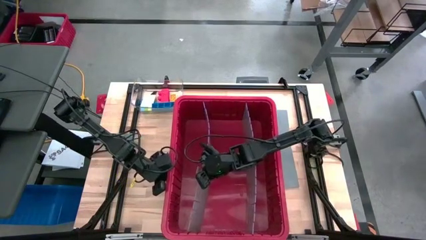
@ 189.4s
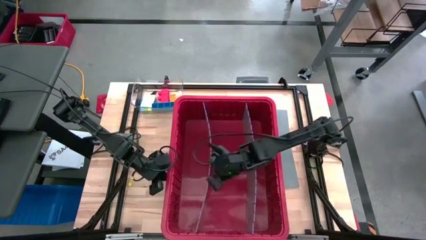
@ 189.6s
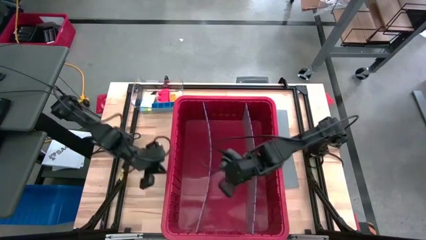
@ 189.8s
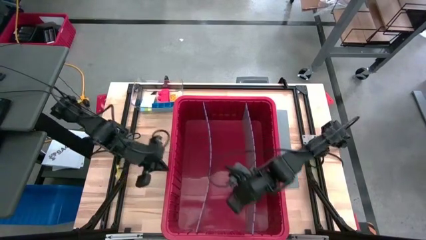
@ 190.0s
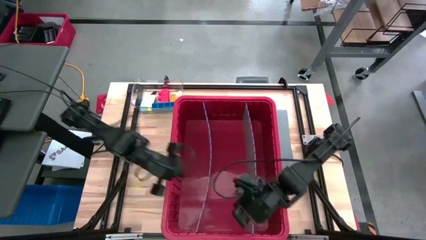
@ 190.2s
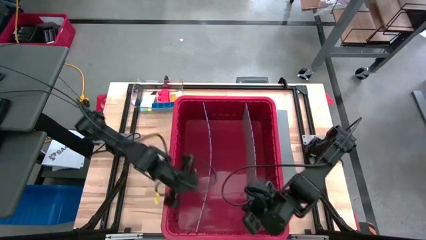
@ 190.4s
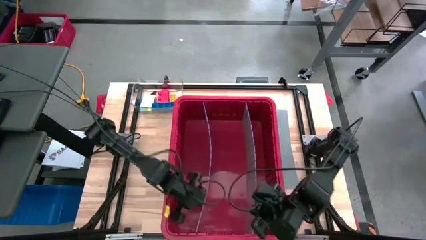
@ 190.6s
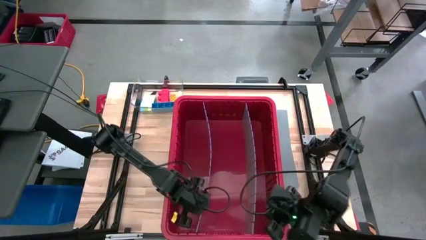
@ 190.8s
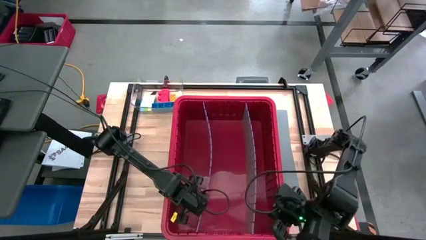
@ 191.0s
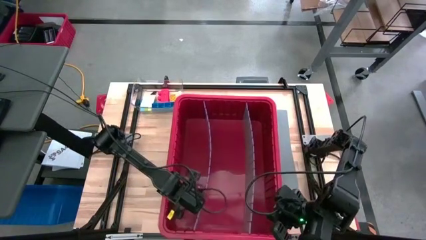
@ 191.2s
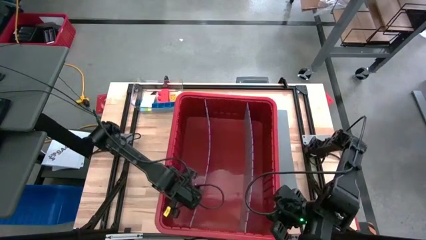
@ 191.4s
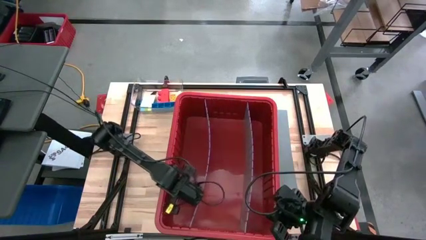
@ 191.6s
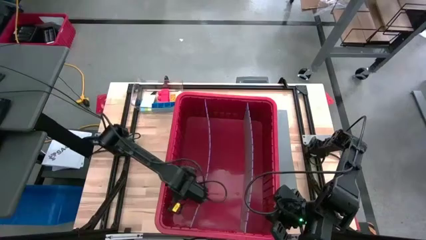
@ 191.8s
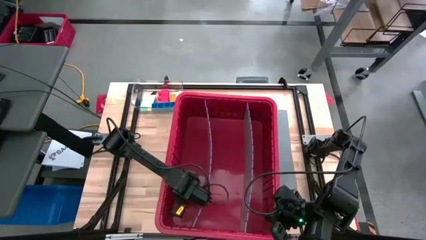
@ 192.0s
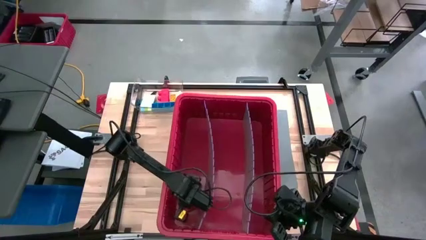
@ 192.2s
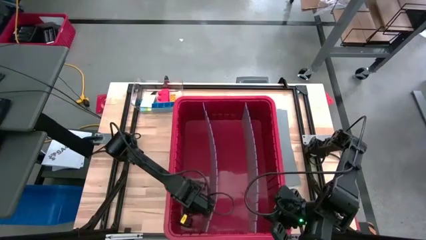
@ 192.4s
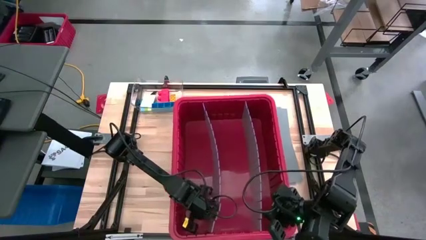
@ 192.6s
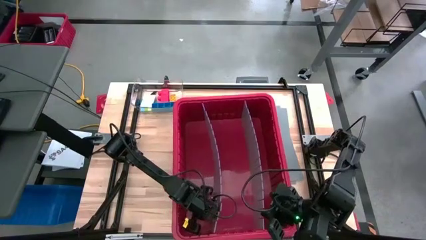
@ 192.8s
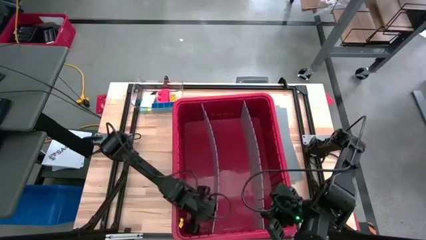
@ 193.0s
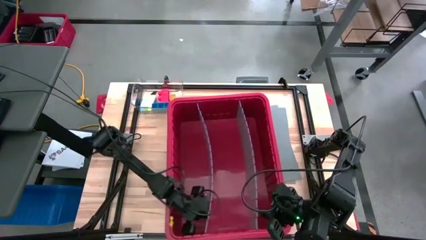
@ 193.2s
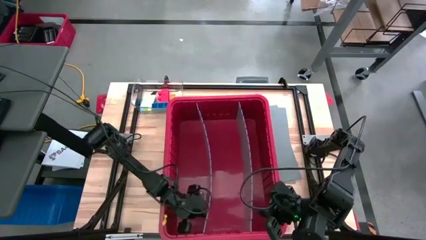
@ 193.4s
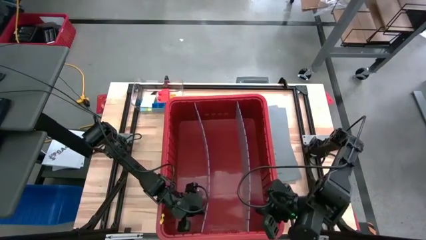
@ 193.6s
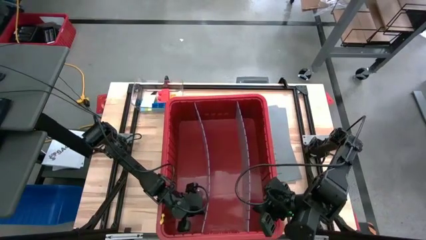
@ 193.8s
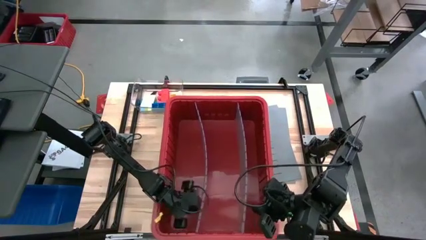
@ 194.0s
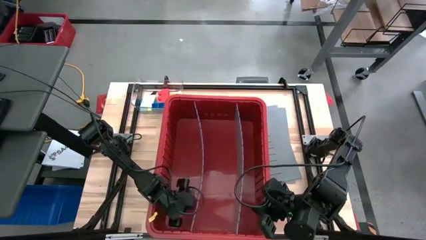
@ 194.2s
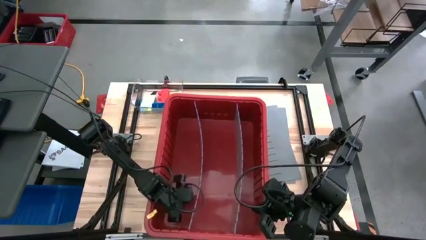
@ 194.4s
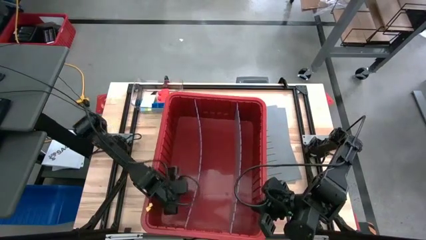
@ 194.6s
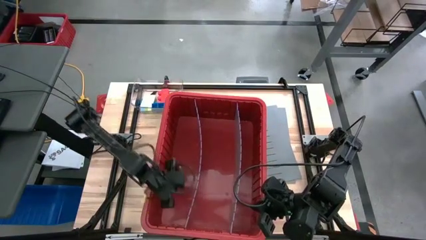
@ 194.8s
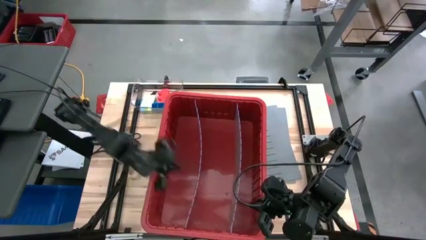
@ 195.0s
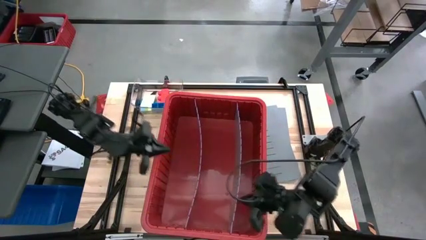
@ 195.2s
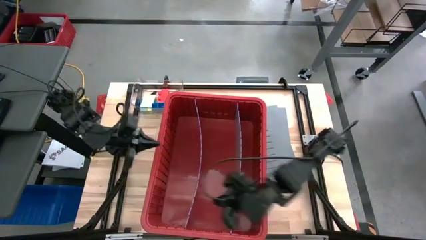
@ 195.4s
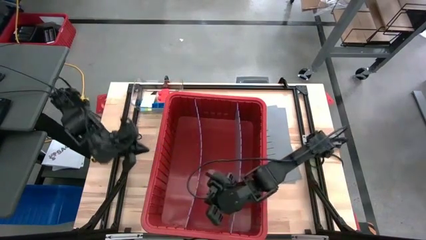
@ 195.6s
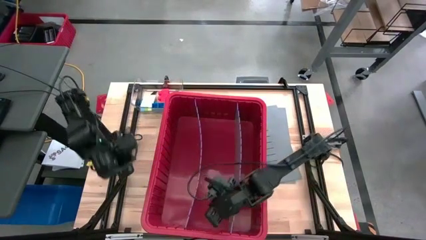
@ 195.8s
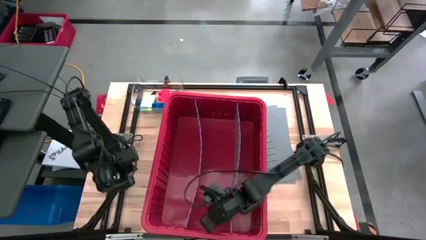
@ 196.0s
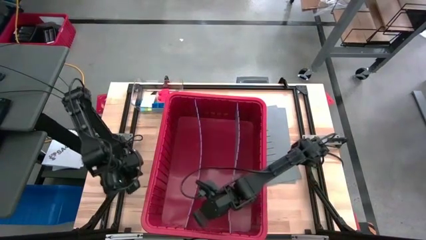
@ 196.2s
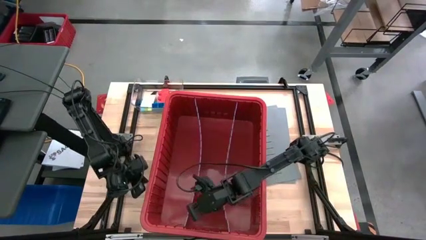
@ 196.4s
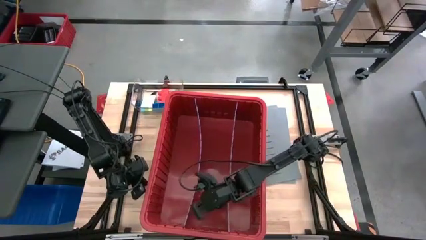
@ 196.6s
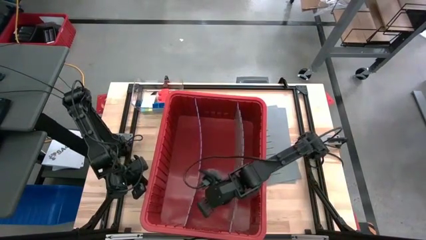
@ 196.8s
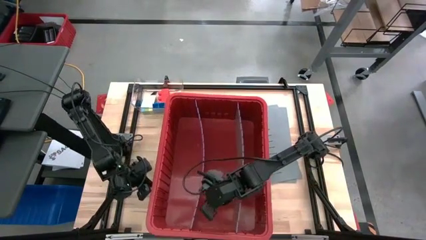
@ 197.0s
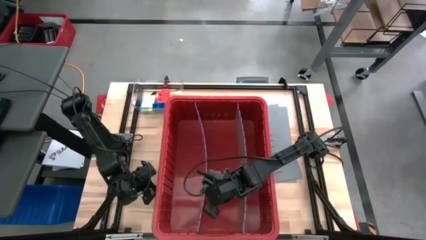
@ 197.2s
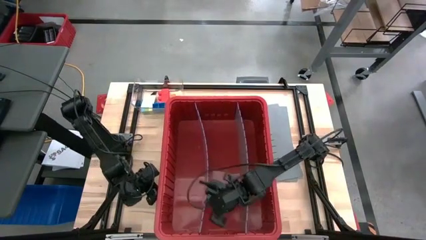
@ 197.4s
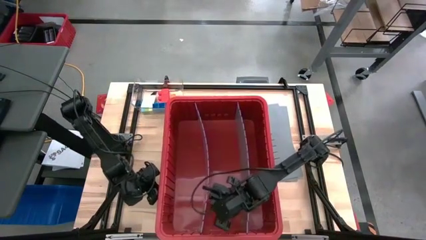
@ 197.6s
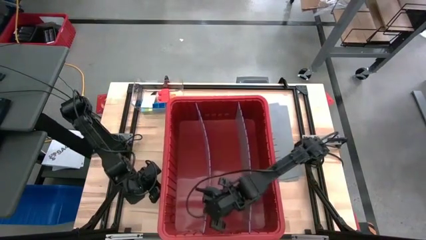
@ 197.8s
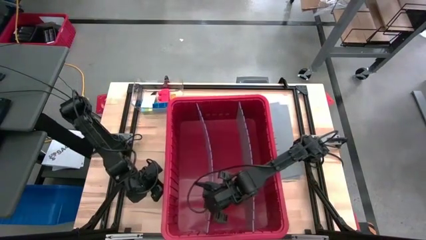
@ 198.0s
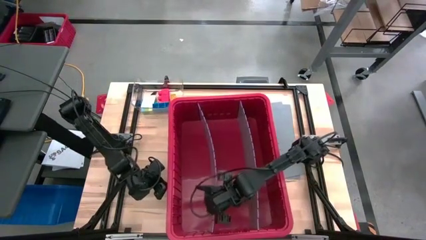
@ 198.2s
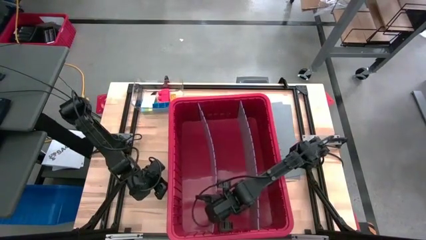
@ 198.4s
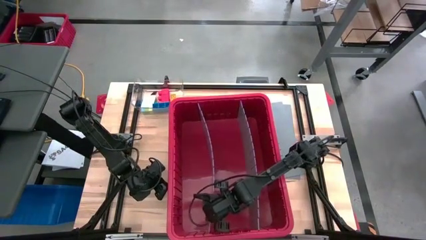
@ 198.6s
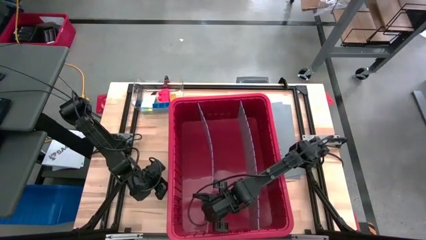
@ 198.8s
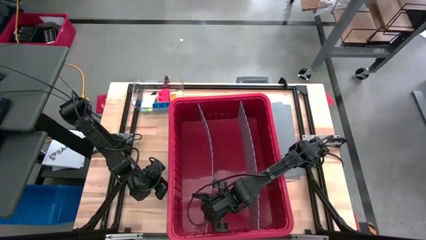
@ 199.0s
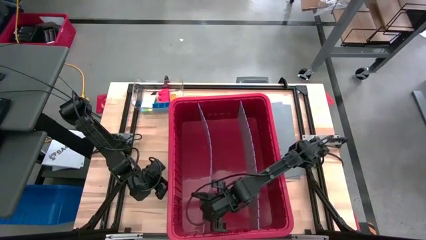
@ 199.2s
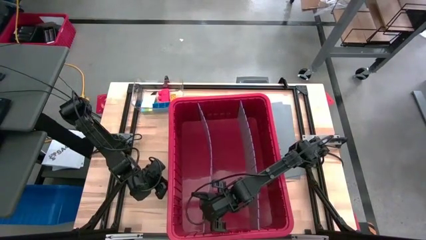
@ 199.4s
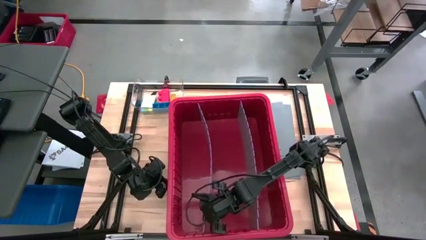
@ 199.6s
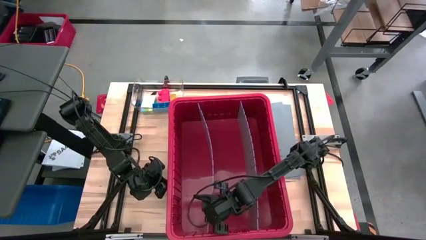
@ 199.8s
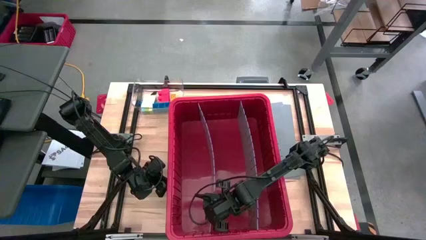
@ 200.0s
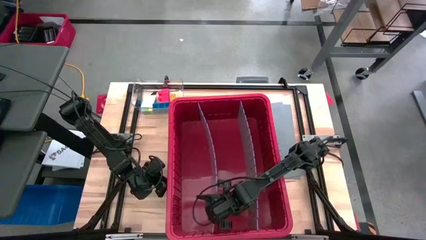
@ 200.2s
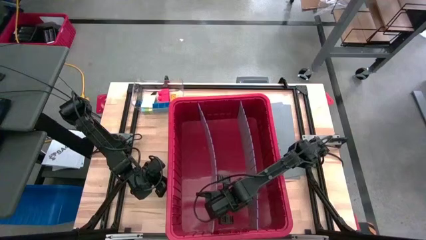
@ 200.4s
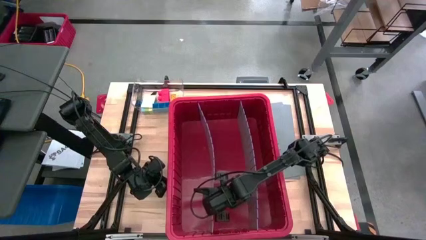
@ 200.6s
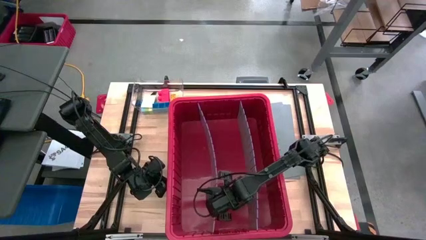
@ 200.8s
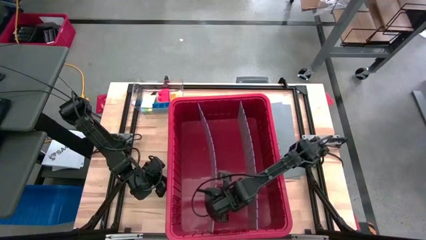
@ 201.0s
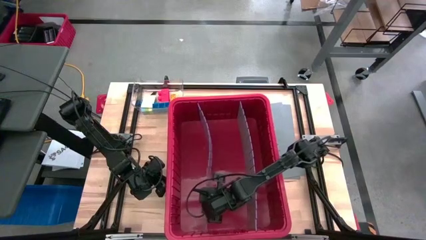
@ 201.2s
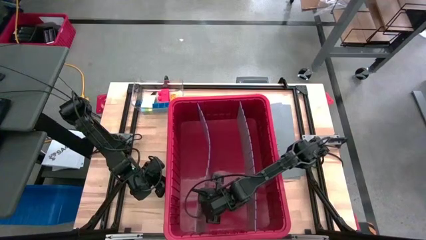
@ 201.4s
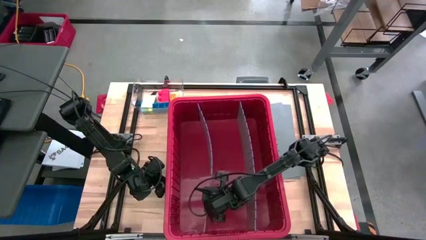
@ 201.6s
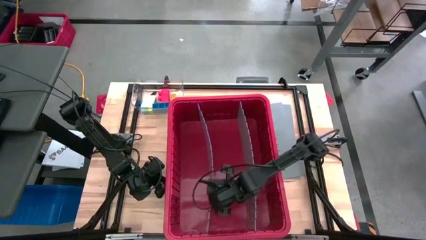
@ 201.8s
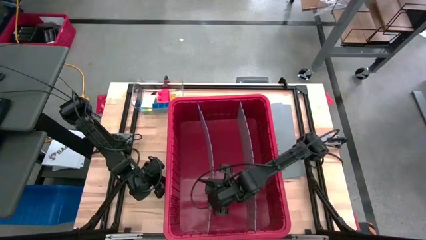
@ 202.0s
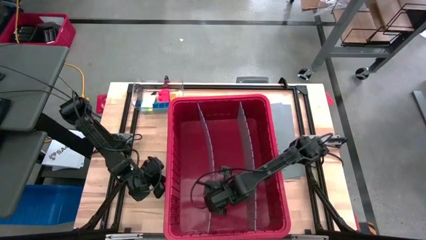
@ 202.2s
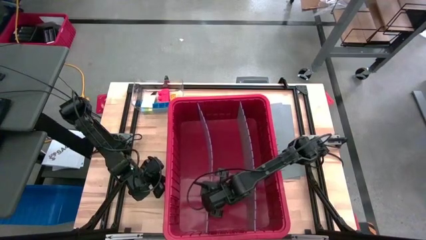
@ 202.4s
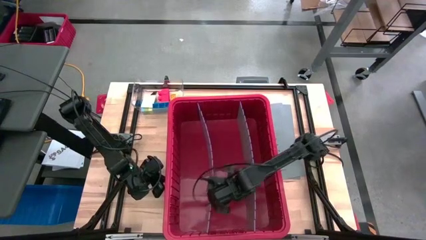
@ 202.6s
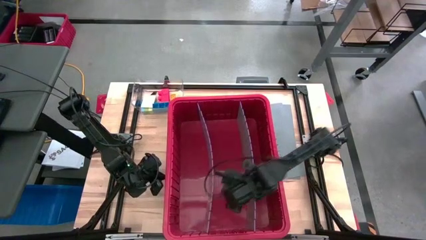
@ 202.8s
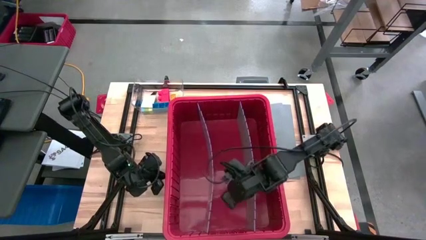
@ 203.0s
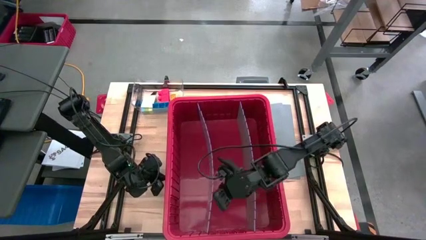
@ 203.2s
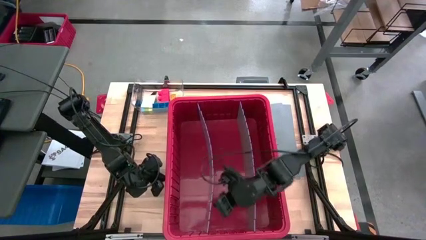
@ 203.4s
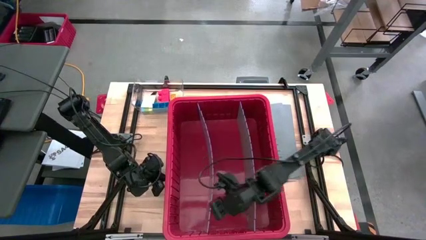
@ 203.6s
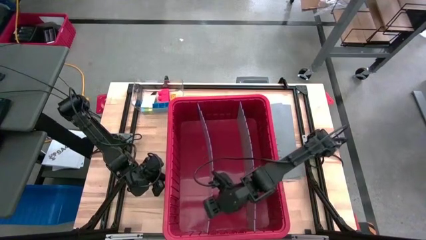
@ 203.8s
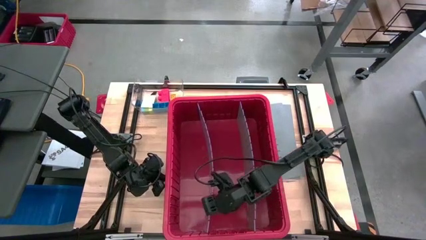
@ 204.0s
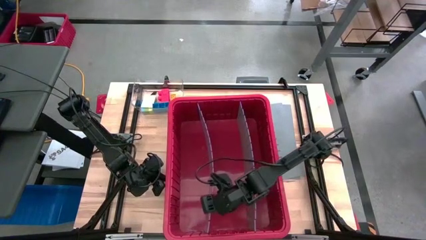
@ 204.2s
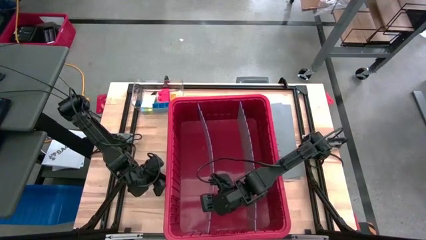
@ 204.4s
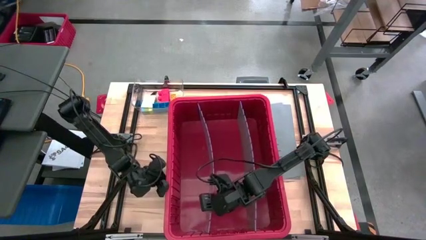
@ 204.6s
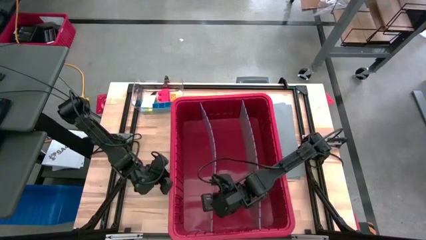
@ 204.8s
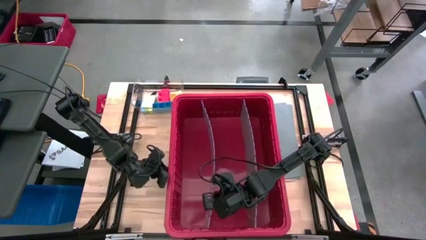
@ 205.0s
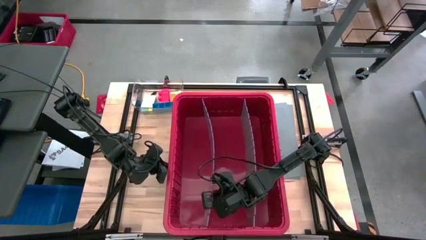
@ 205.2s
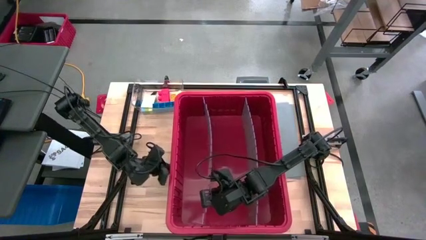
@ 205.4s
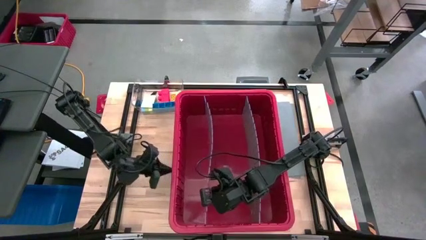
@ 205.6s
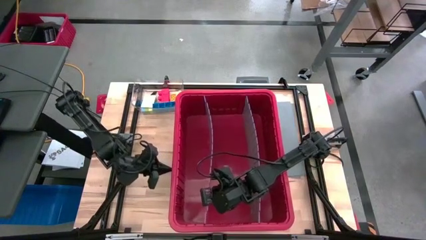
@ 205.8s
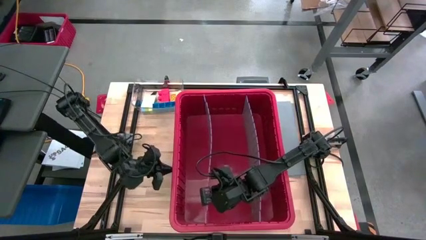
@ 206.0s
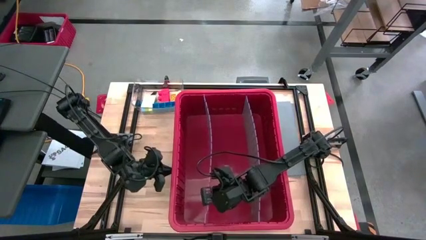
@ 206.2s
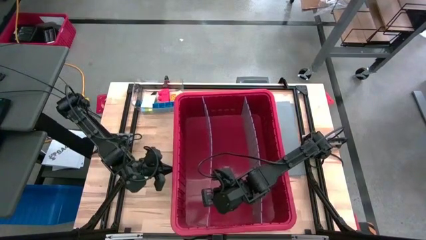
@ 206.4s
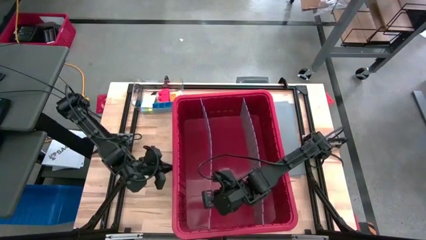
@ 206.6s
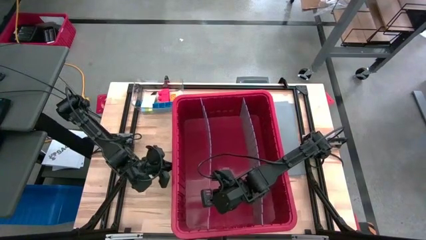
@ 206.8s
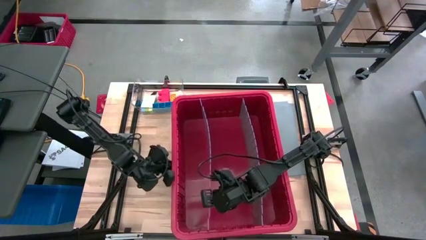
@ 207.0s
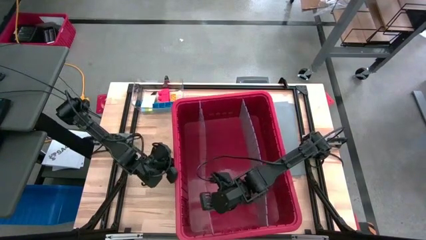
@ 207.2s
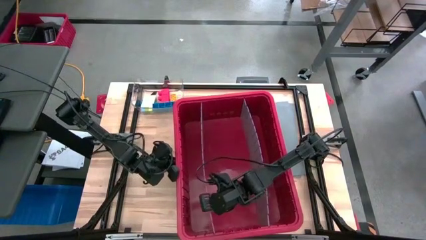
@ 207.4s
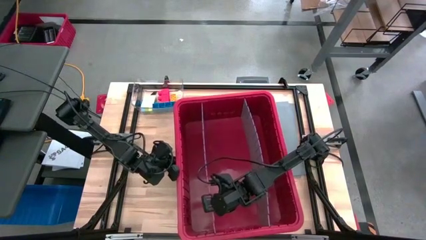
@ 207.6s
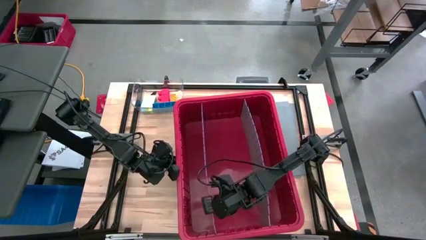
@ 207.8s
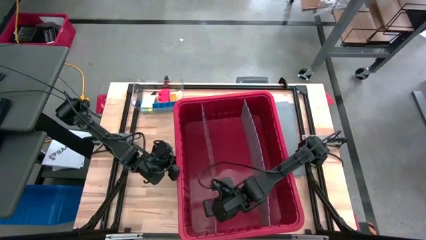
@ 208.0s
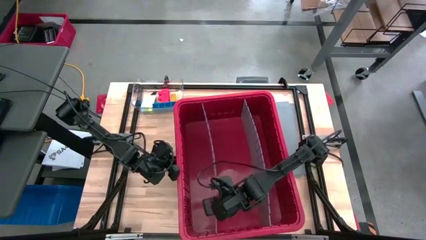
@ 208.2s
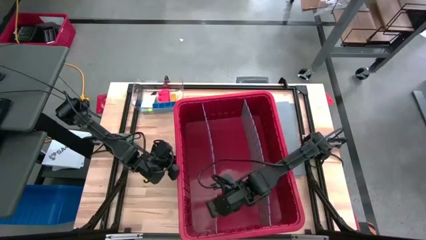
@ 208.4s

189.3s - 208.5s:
Task: Sort blocks
Assemble the bin divider into the red bin
